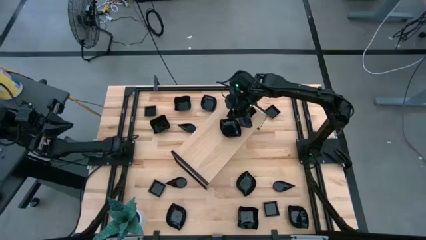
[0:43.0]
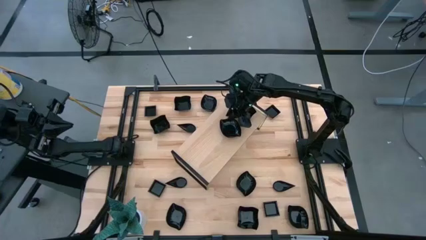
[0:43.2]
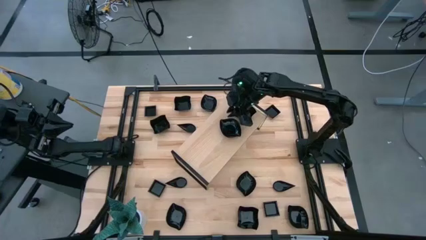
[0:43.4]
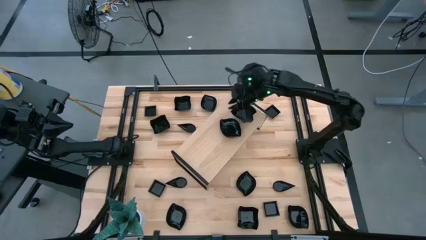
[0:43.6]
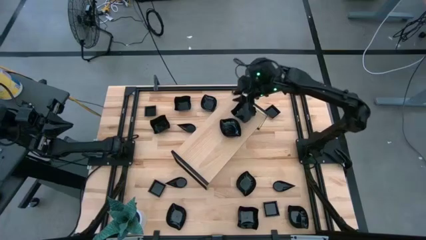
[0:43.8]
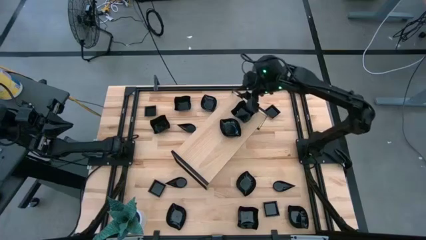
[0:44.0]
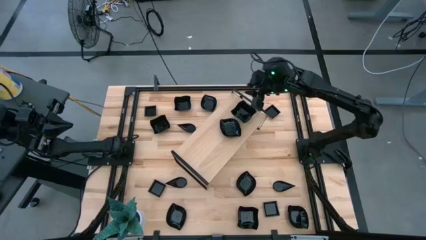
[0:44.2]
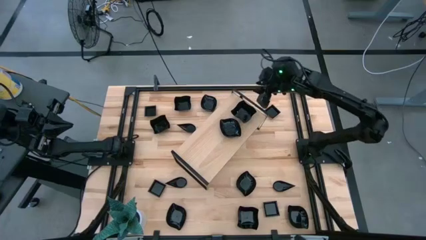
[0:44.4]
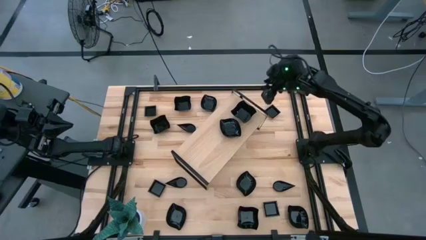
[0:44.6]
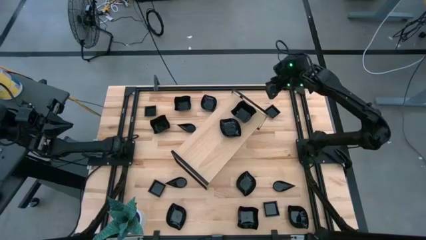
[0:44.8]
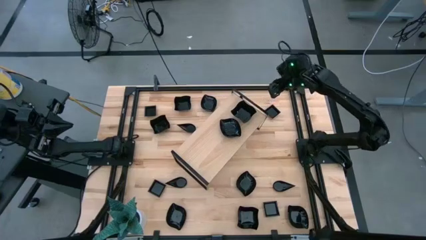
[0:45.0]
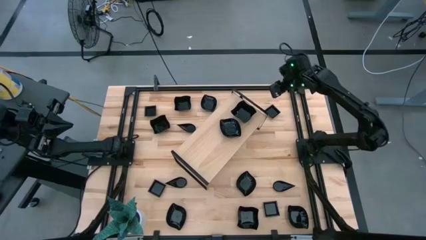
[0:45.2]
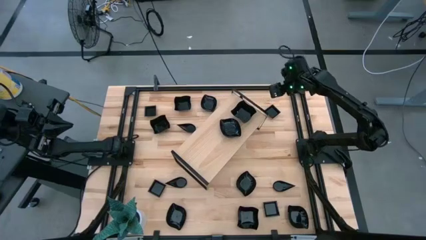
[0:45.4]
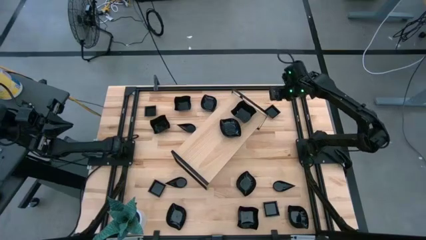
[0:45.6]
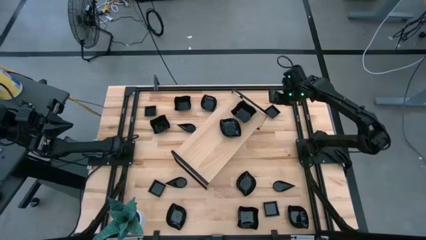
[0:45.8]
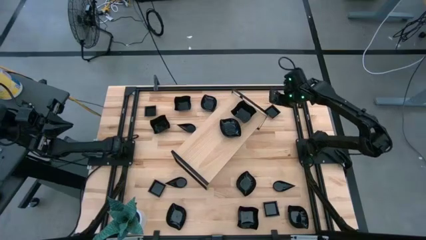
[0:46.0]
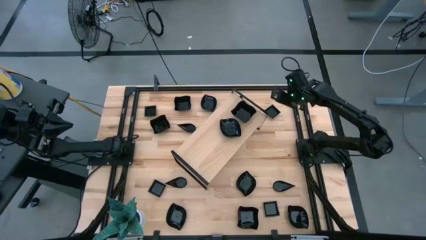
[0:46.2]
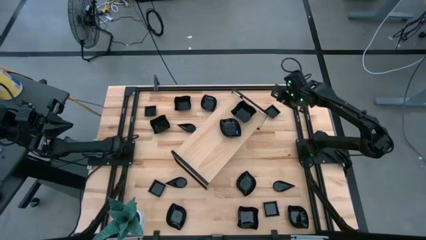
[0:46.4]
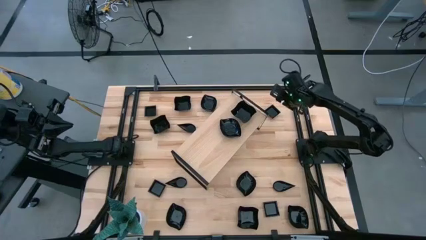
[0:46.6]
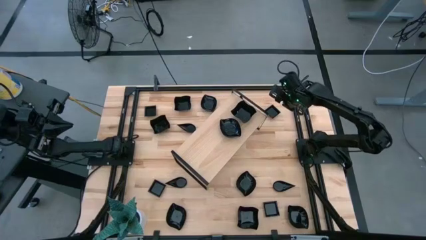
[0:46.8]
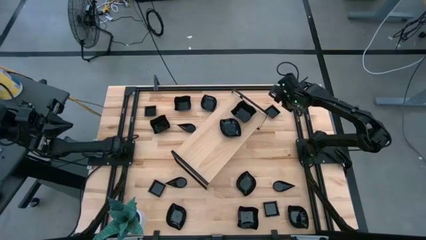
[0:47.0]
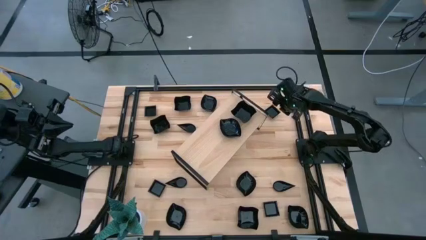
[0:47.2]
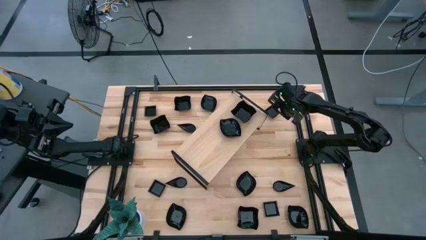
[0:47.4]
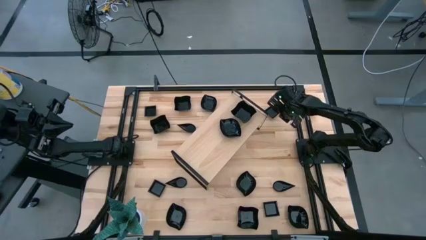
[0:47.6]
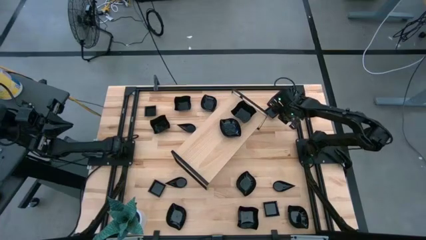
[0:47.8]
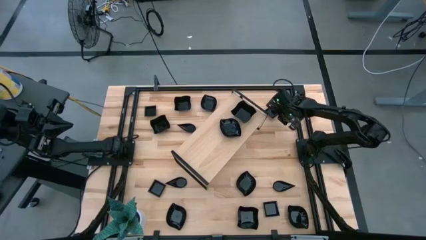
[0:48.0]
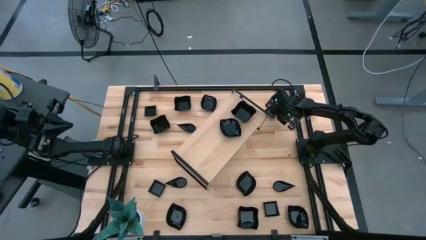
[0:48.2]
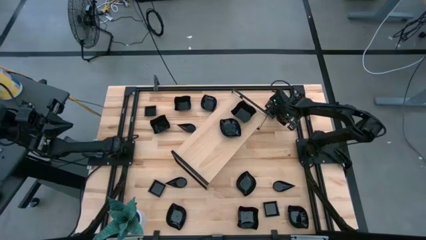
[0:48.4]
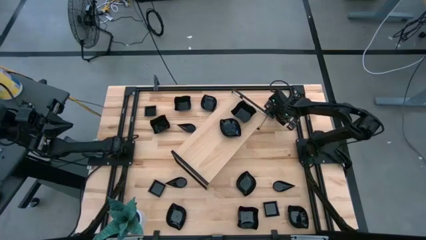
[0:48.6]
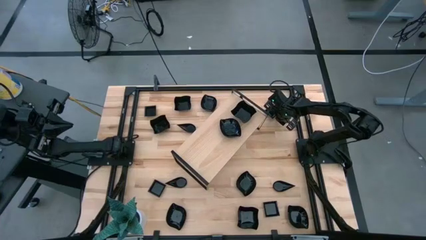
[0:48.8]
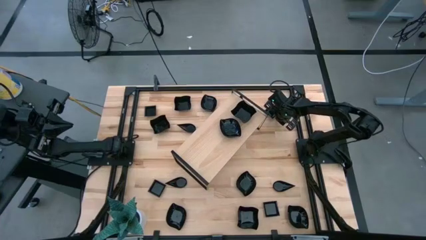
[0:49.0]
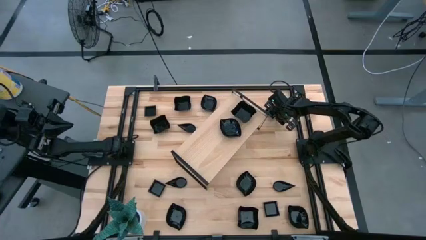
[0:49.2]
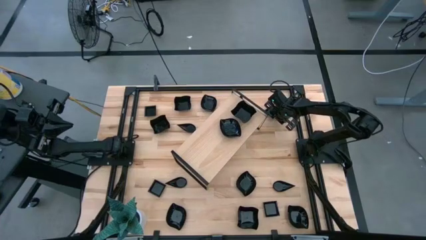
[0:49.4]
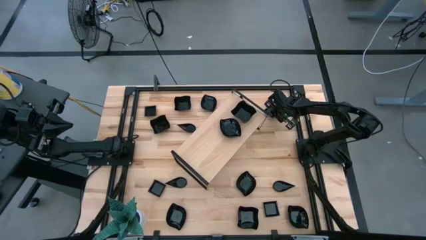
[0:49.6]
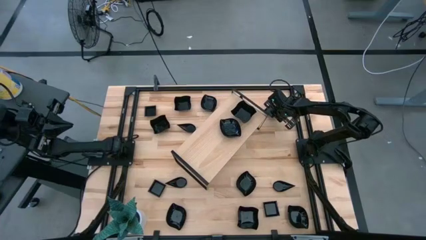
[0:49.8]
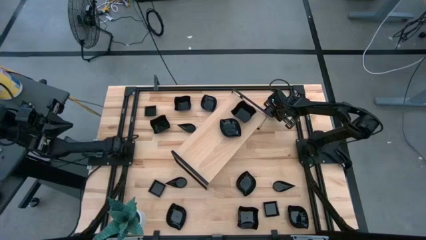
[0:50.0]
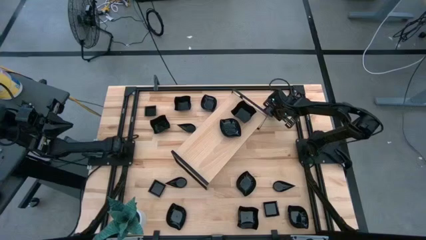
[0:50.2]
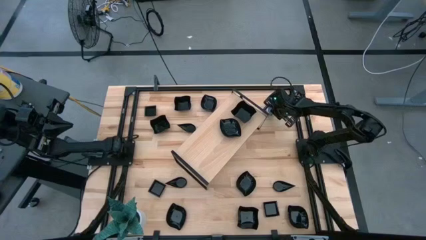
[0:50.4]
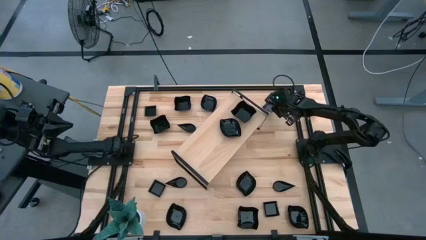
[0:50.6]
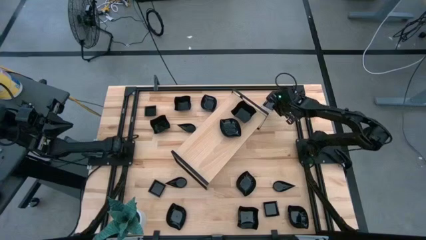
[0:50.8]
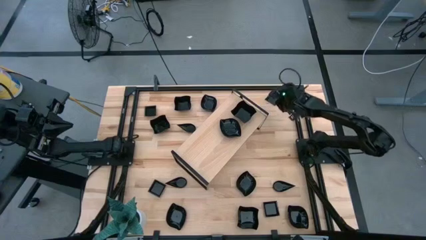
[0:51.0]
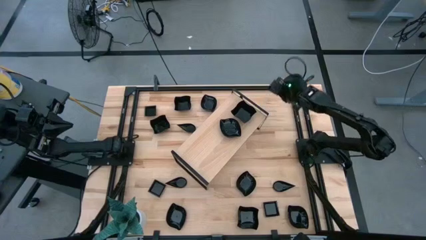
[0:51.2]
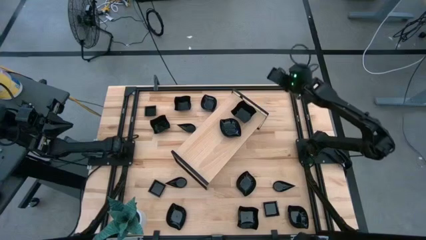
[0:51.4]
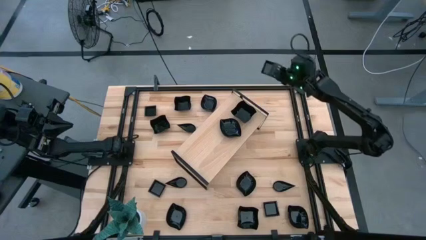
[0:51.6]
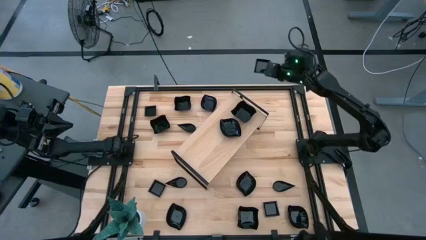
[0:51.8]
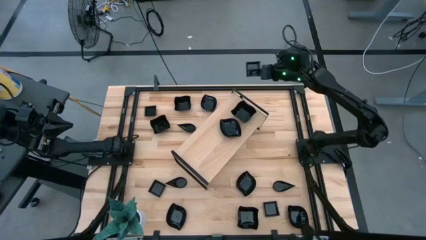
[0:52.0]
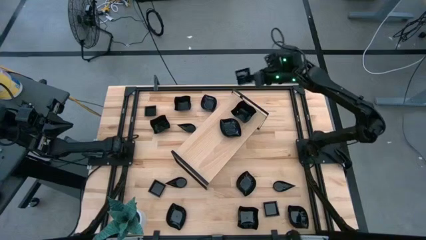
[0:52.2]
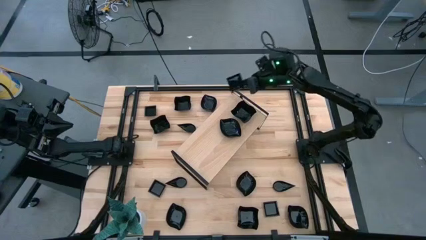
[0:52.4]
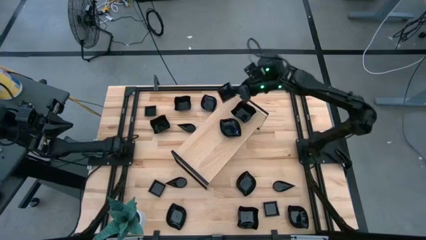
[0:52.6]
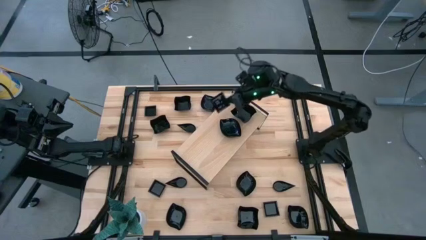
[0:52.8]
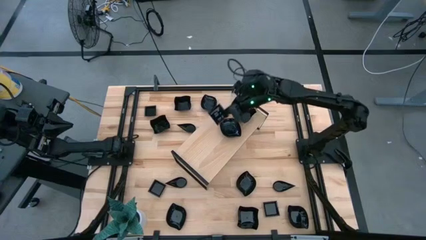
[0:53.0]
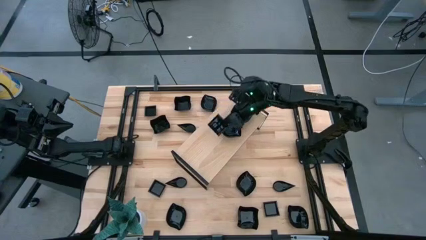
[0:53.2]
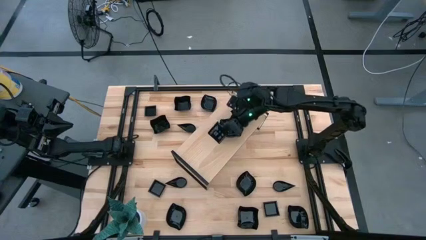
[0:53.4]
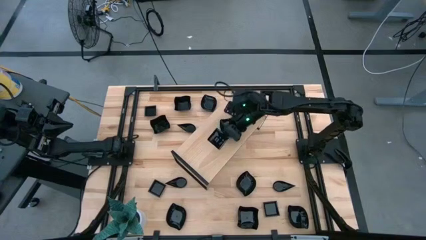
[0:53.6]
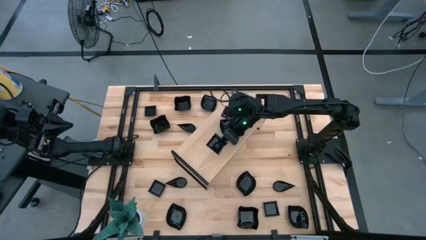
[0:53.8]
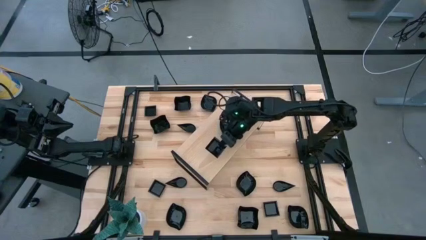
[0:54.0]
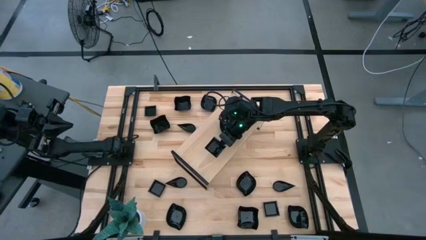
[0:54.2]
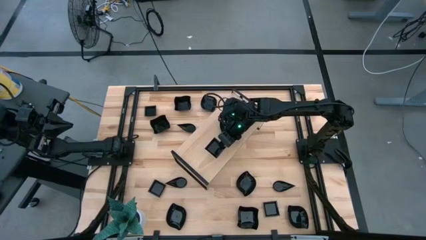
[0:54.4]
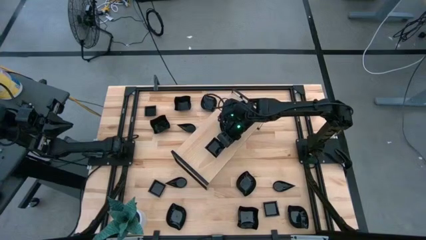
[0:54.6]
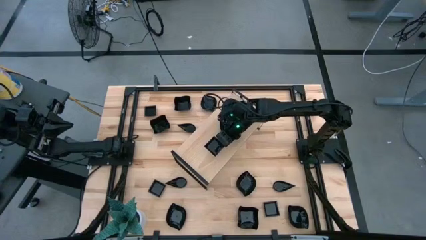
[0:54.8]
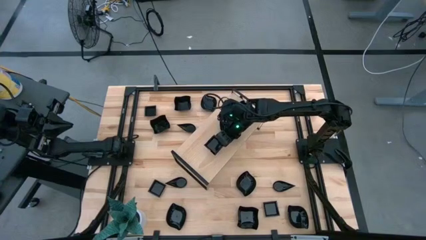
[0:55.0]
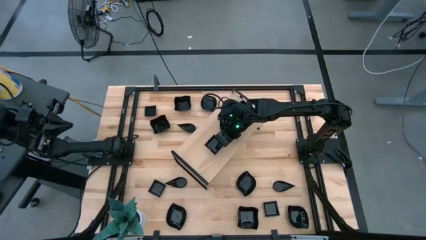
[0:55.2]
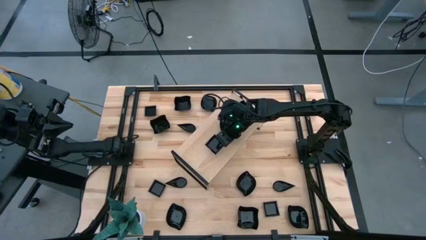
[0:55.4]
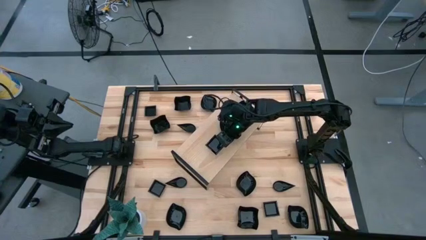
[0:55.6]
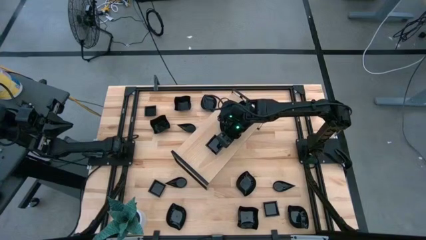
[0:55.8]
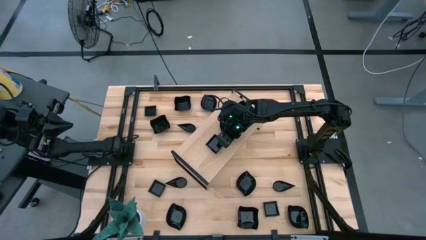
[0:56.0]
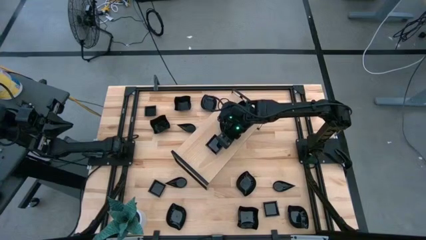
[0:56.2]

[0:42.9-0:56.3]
Task: Pick & Place Mini shaped plates
Put the black square shaped plate on the shelf
